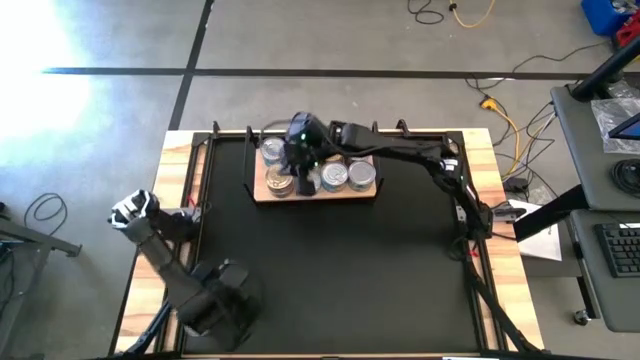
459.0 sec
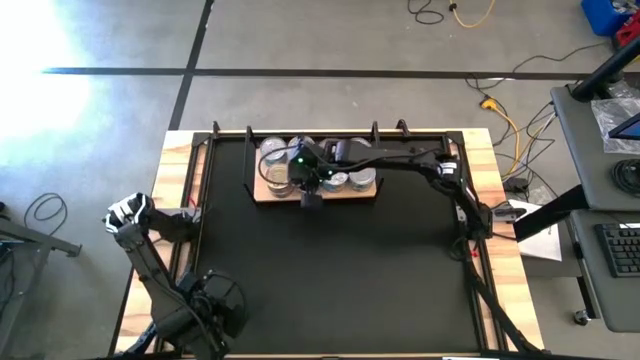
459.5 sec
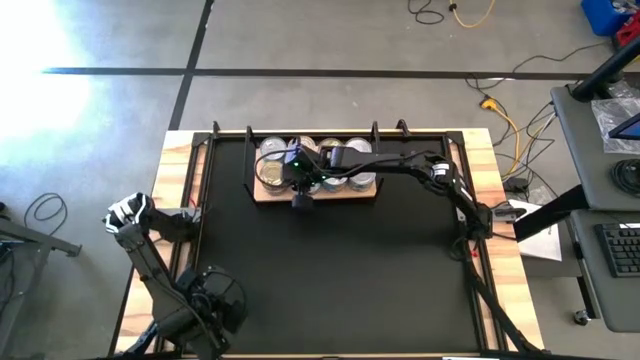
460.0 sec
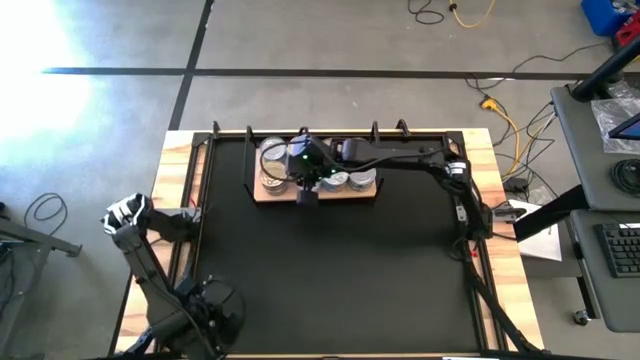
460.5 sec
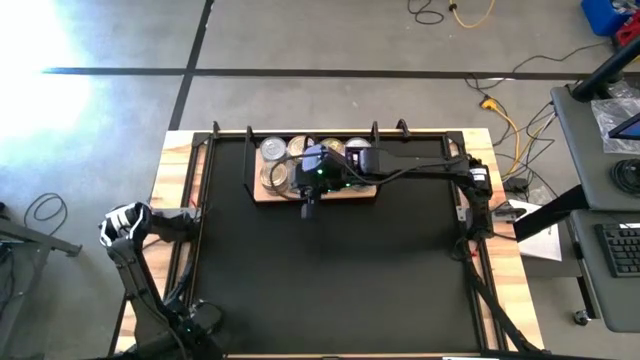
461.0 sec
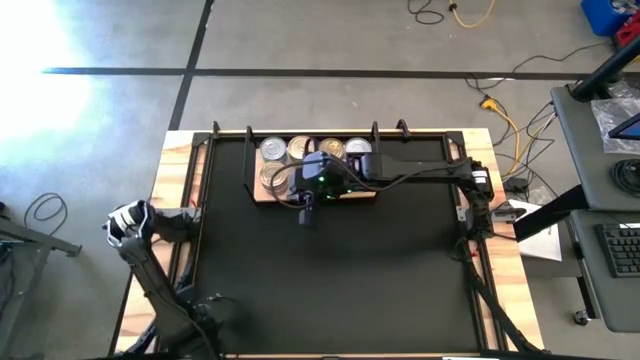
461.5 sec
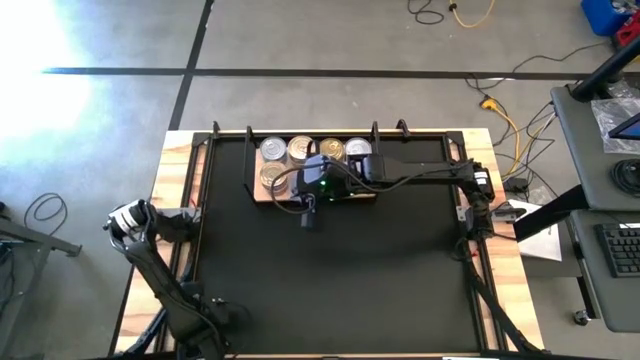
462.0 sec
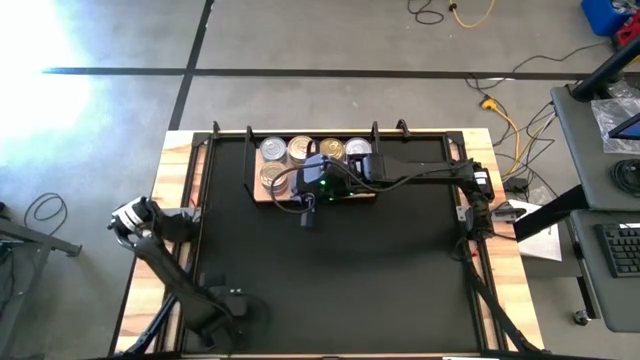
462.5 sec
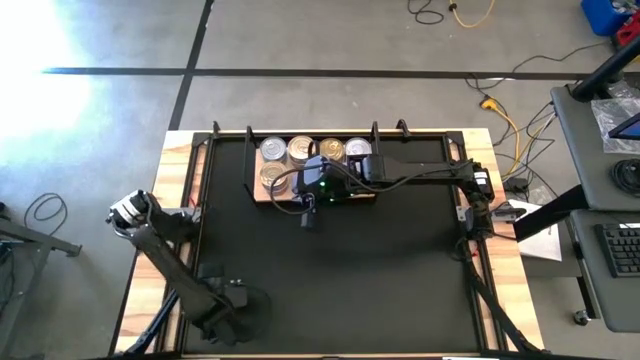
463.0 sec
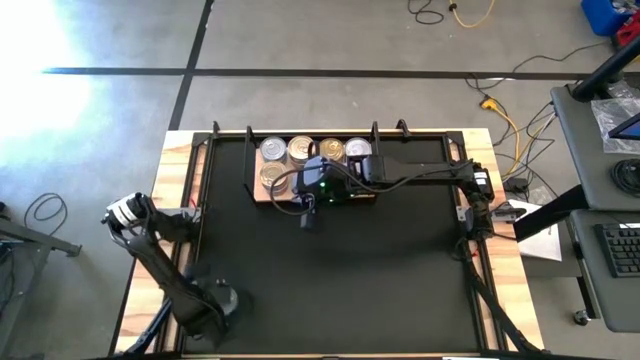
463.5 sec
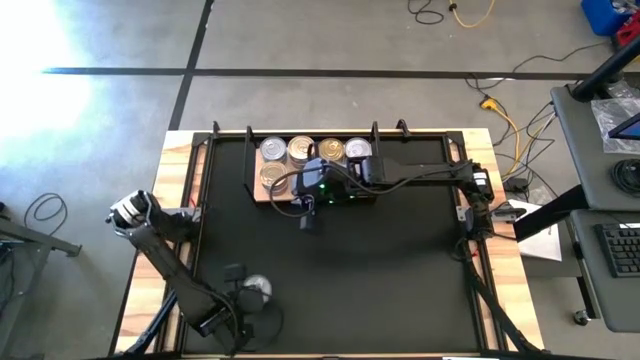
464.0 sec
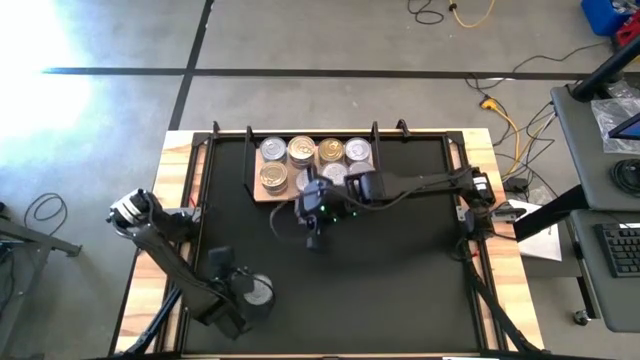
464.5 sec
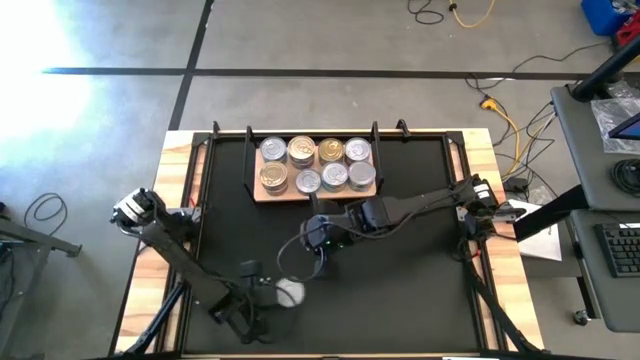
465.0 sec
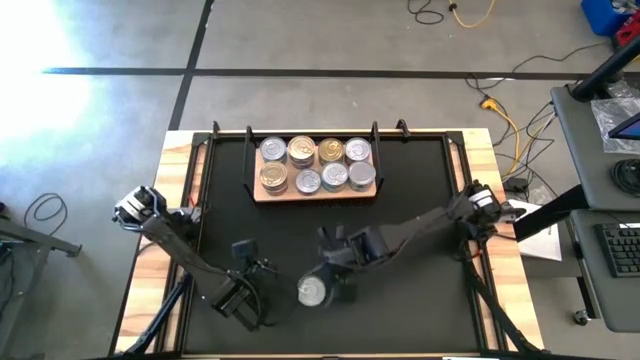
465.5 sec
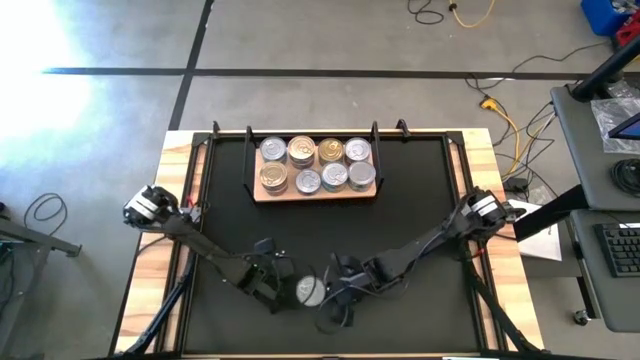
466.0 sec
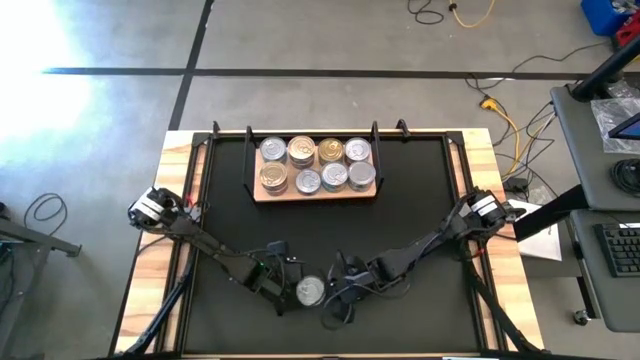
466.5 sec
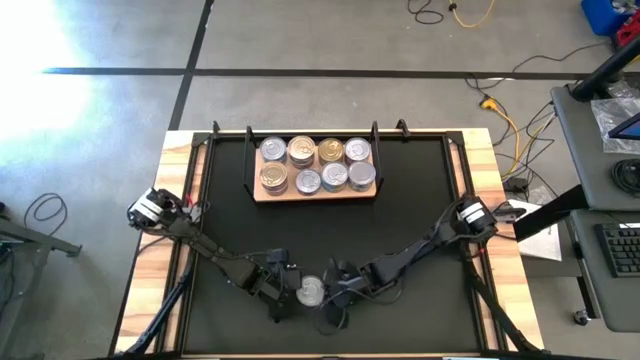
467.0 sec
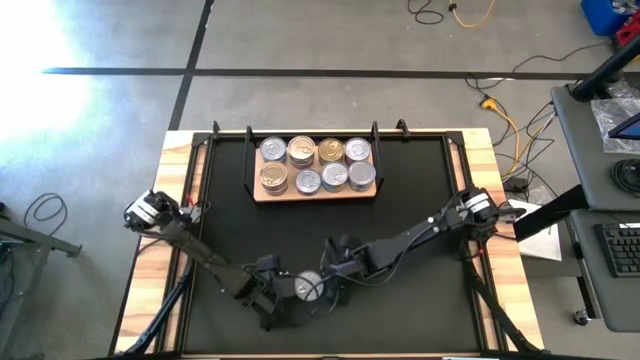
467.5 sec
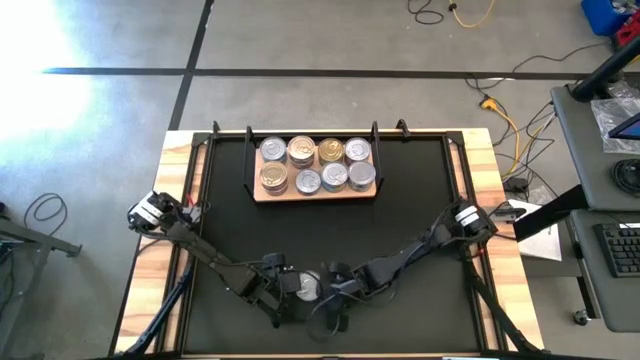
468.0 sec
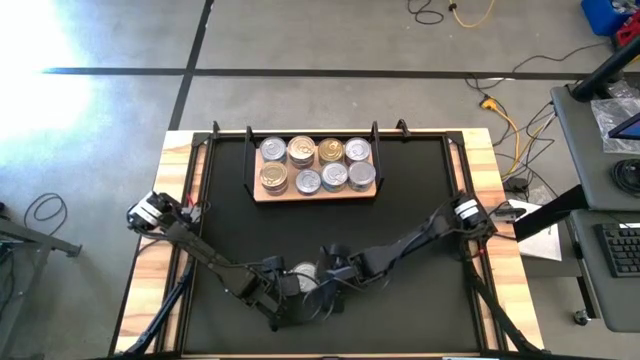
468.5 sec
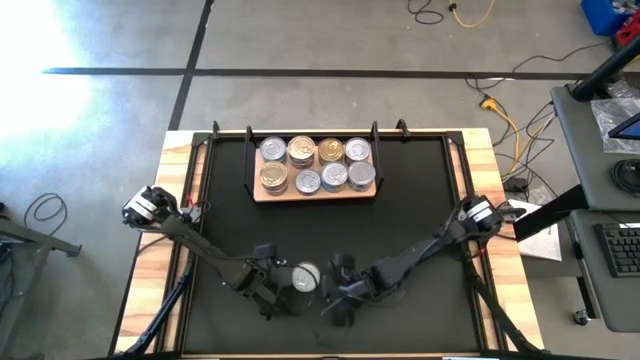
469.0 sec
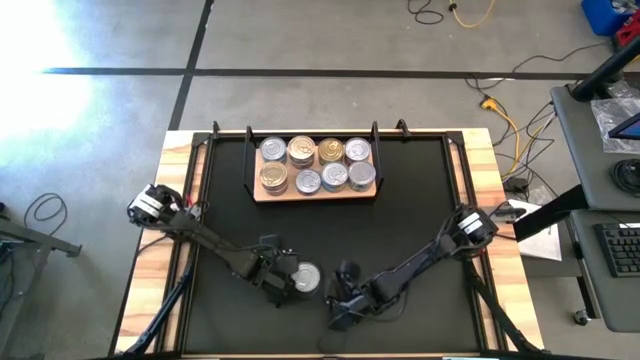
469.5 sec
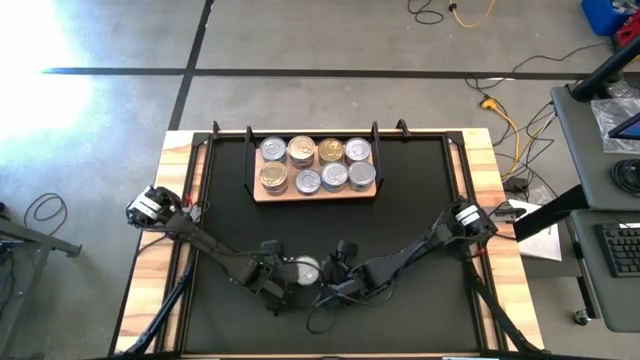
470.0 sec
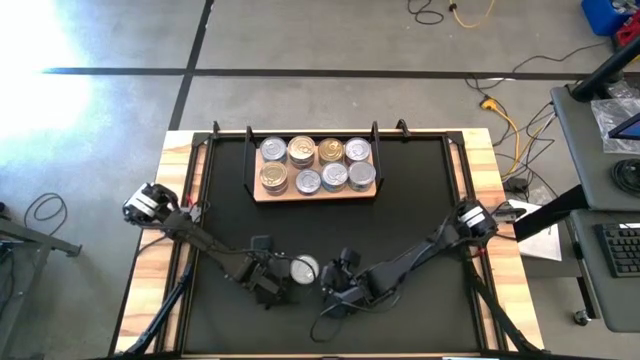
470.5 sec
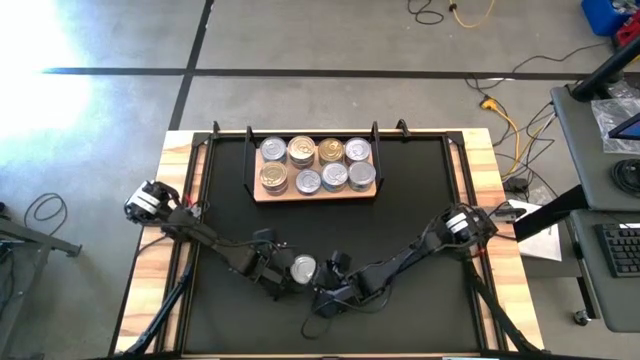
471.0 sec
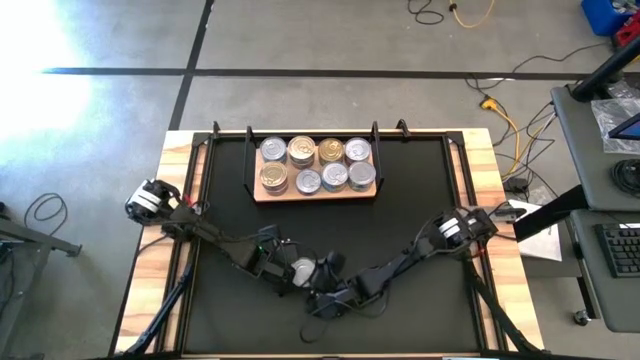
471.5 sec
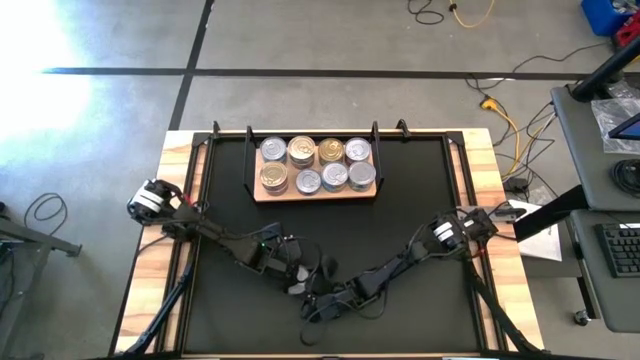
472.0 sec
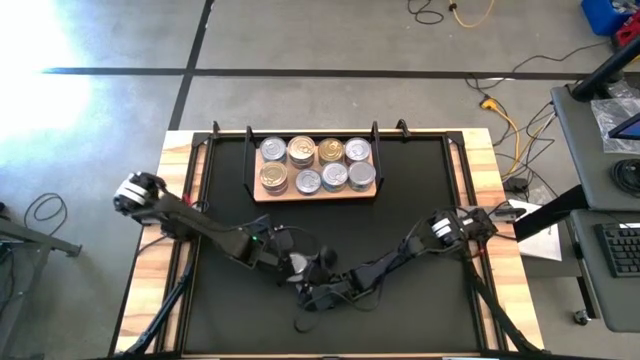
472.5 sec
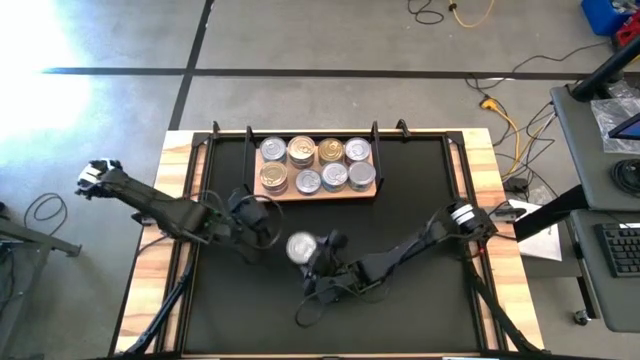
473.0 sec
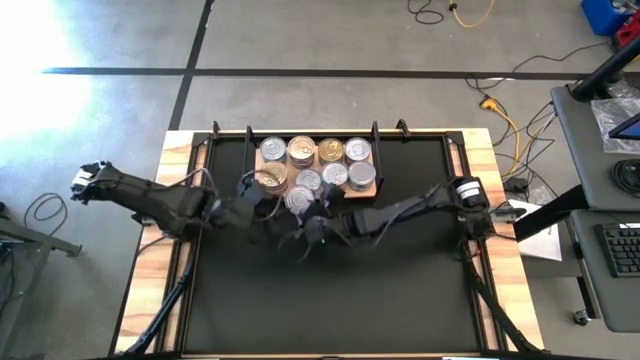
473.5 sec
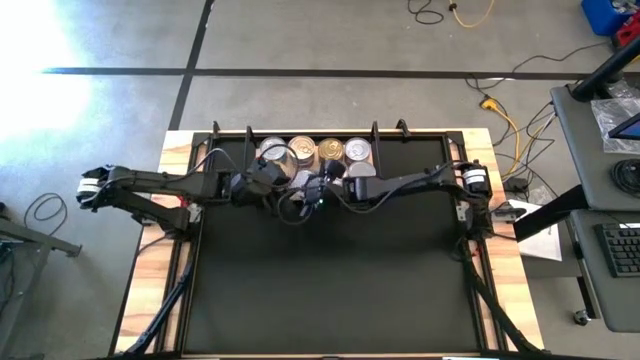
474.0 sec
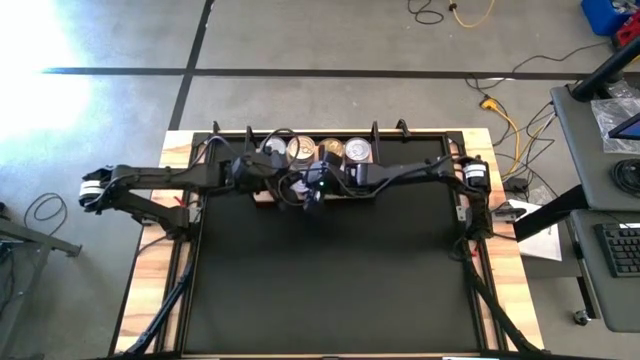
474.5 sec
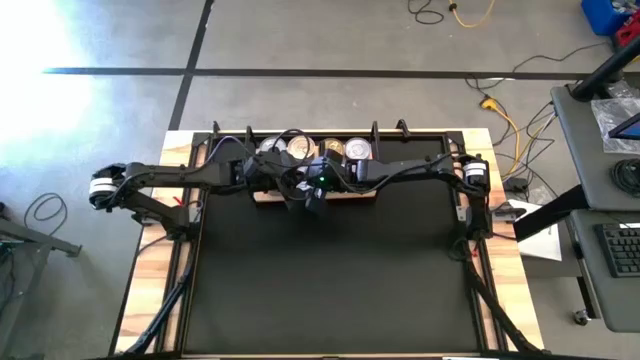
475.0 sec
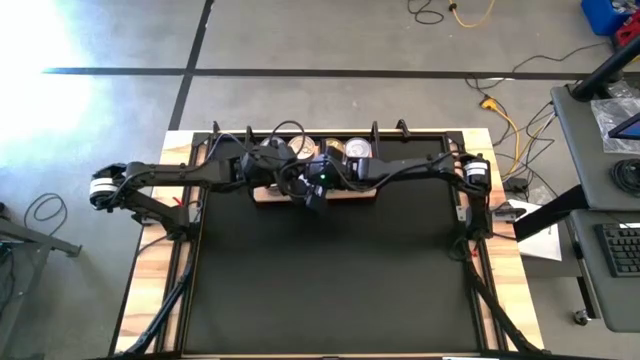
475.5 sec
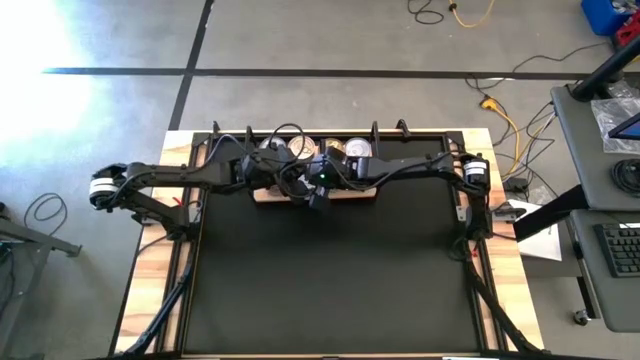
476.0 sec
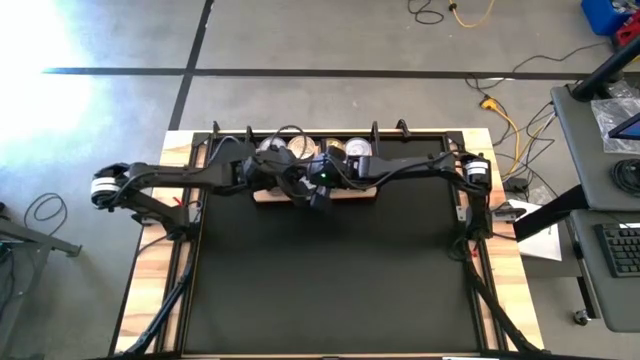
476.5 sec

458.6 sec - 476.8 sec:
Task: Stack canned seafood by type on shelf
Stack the blue tuna can on top of the other blue tuna can on the shelf
